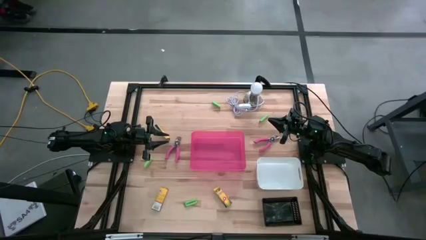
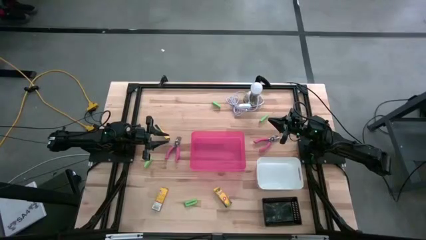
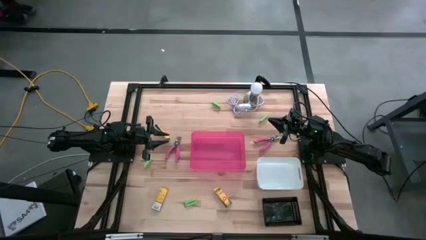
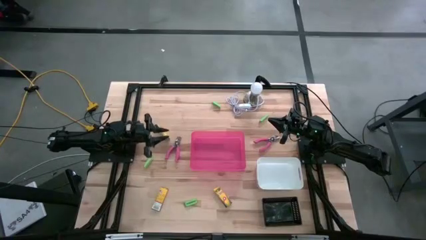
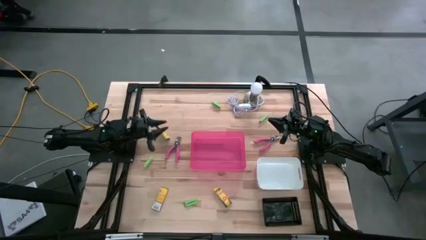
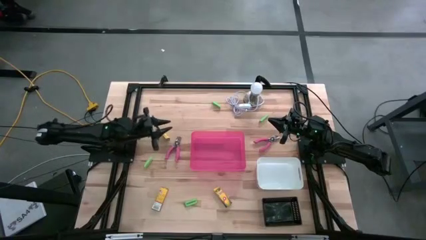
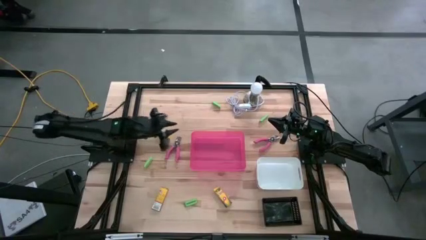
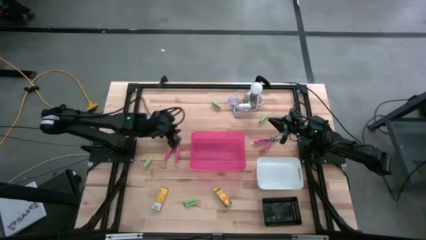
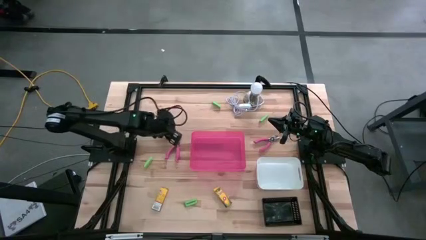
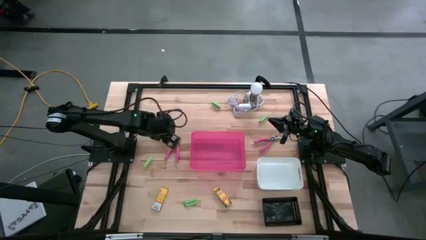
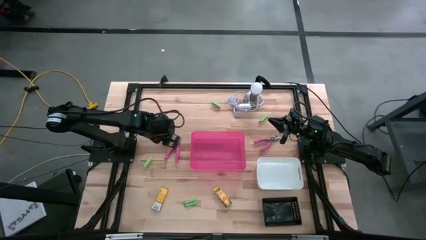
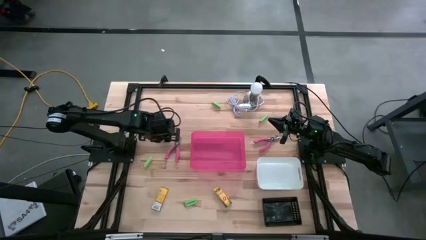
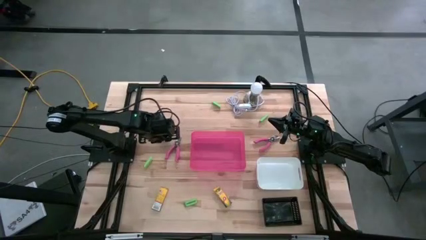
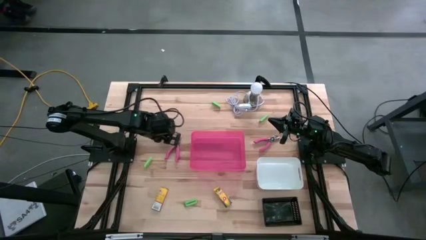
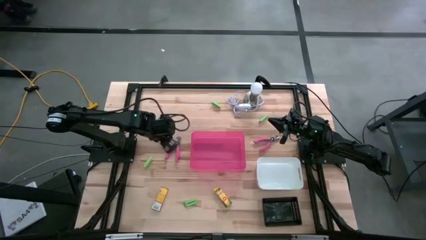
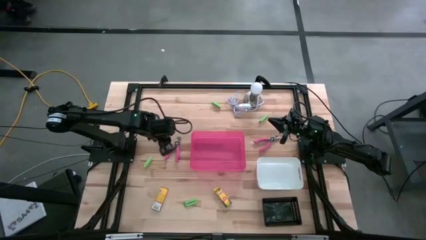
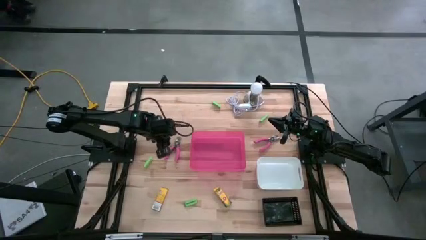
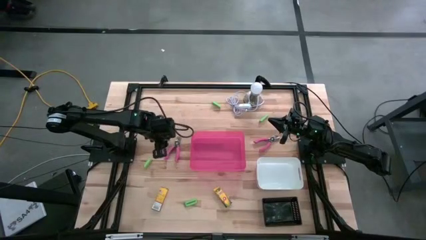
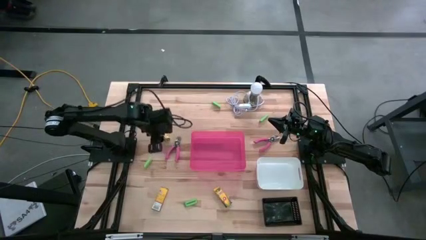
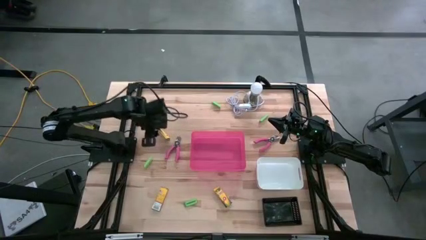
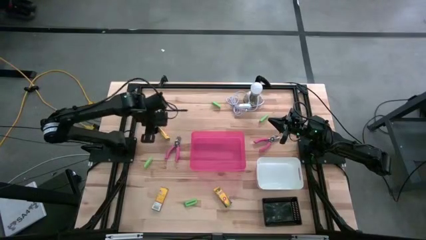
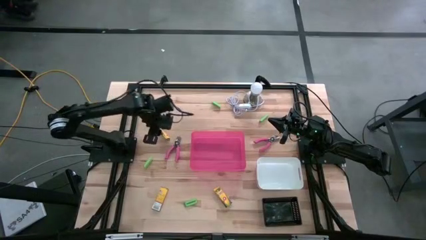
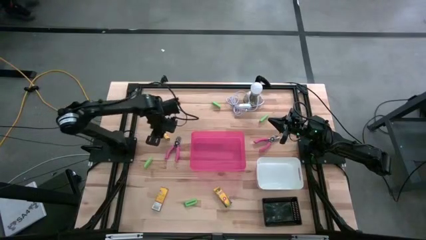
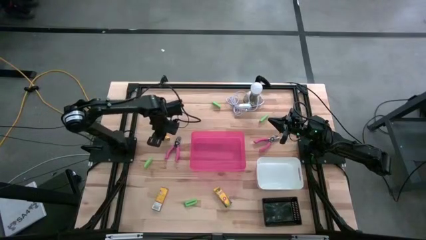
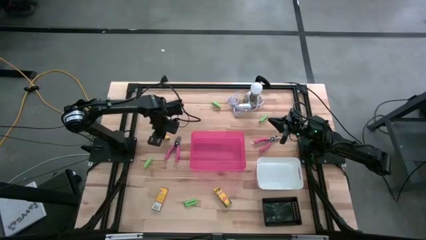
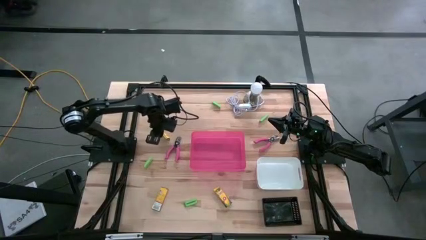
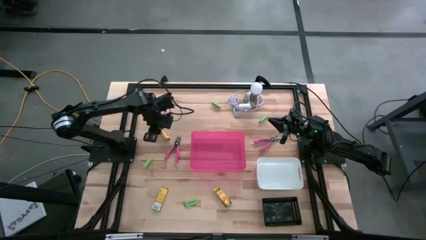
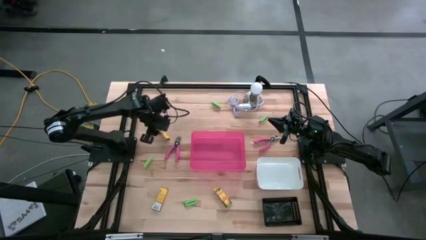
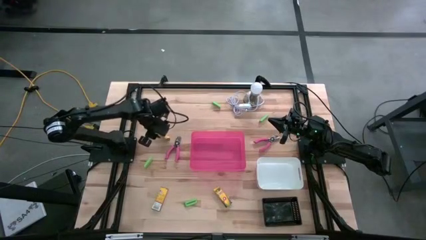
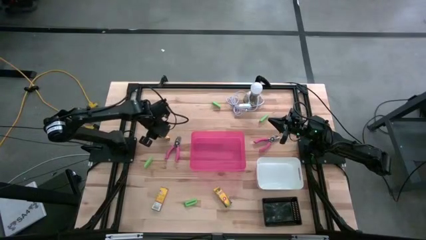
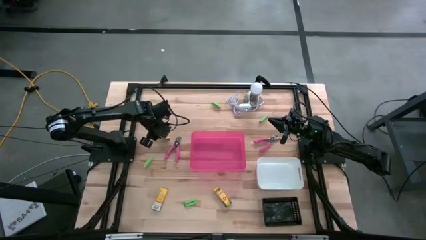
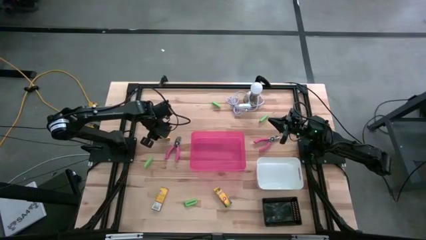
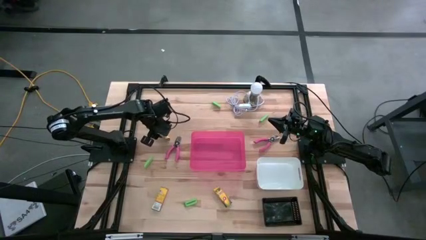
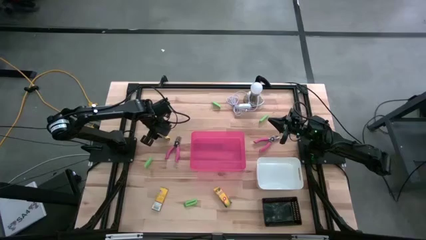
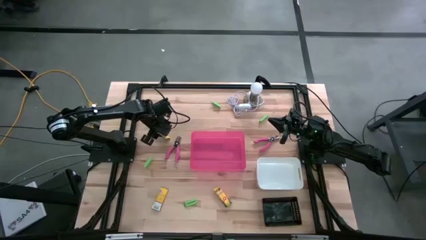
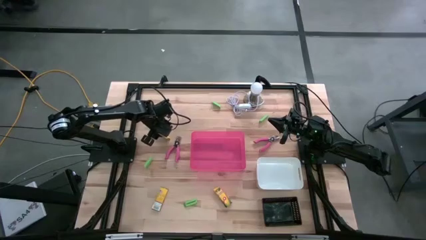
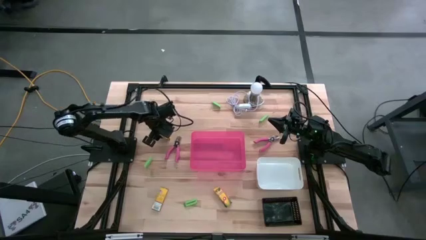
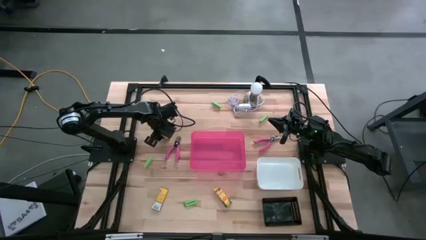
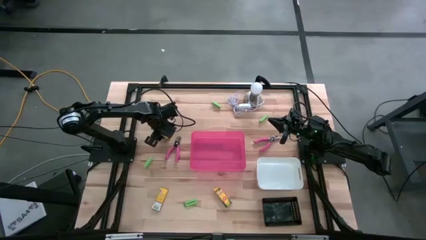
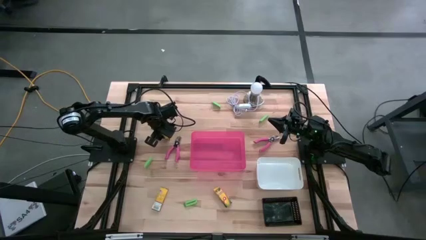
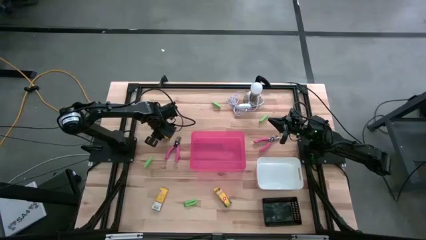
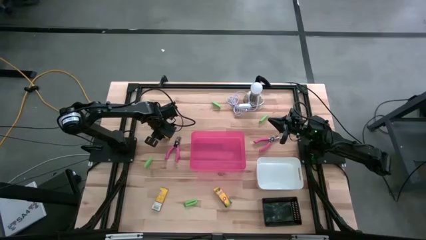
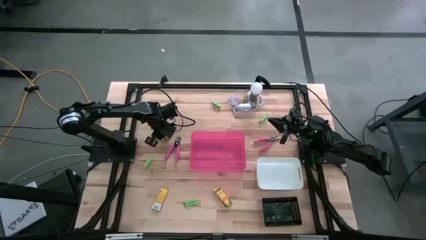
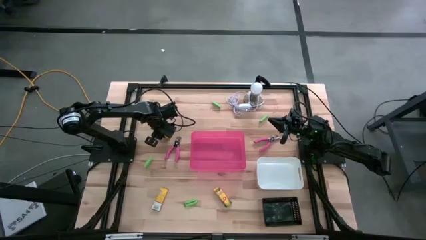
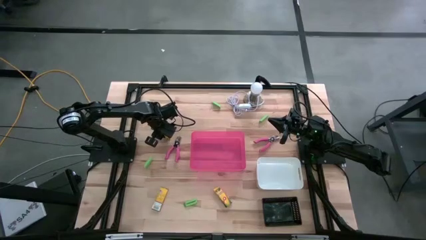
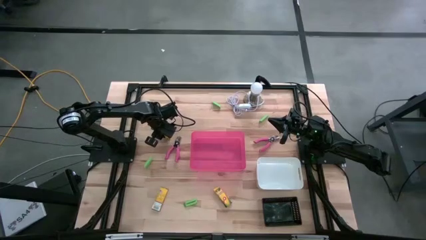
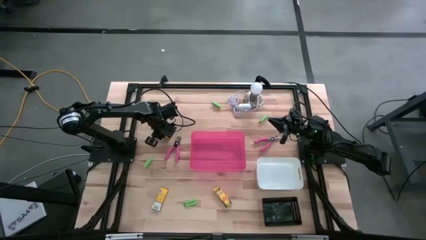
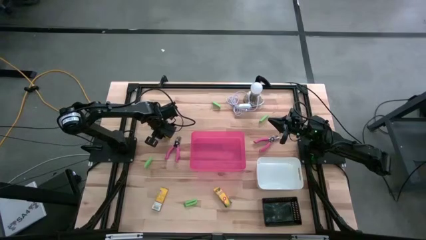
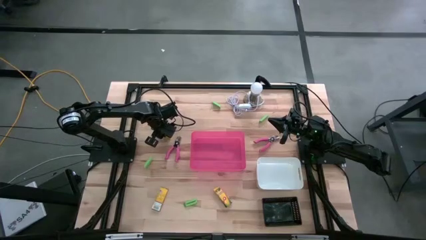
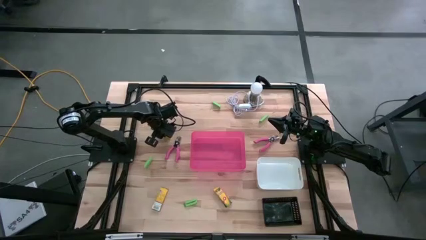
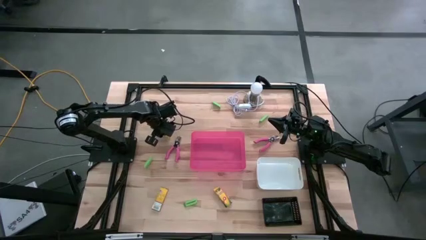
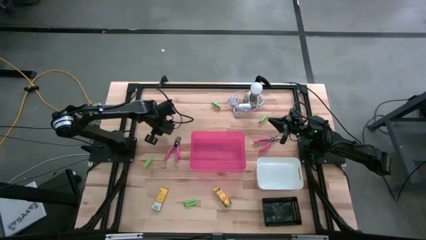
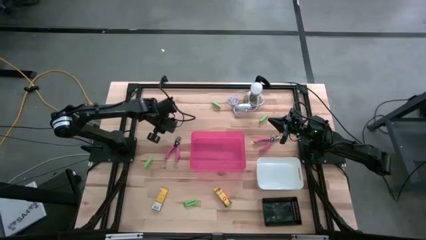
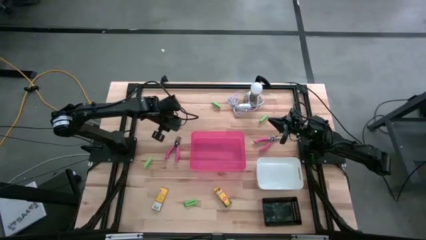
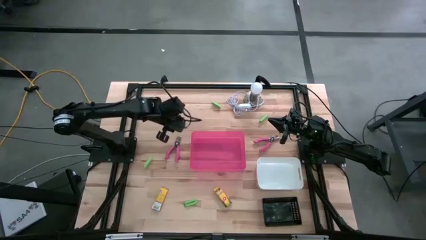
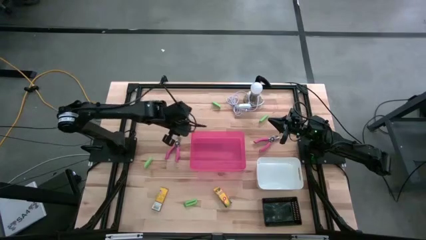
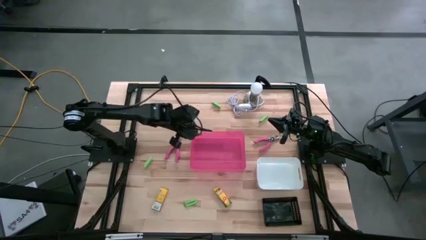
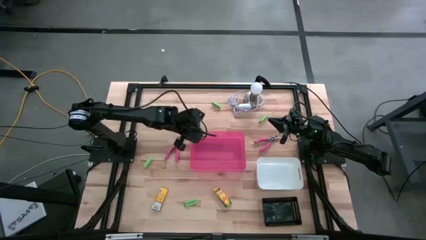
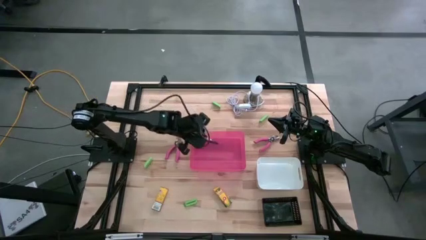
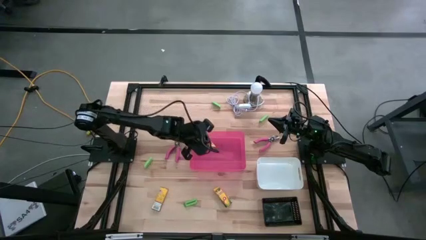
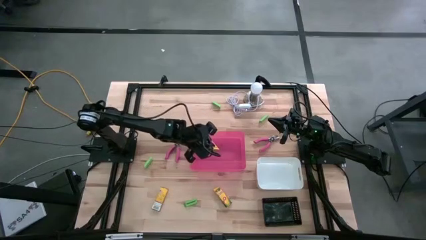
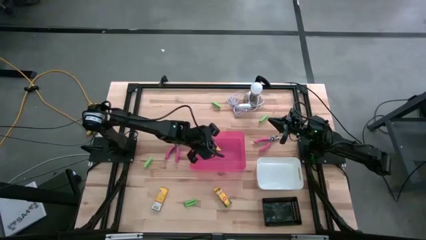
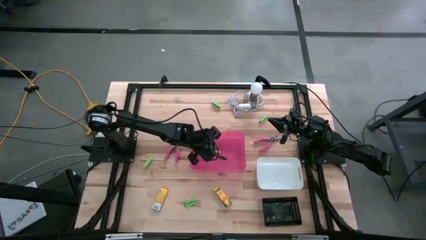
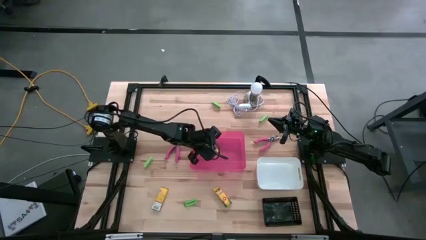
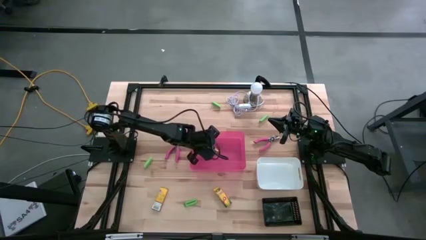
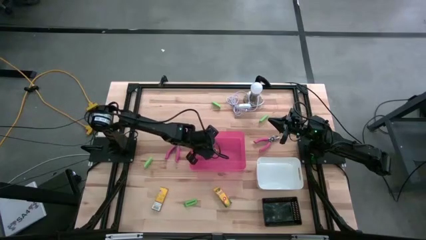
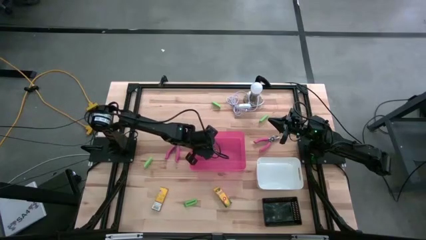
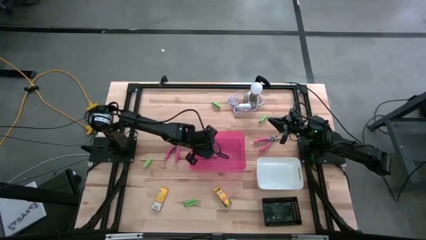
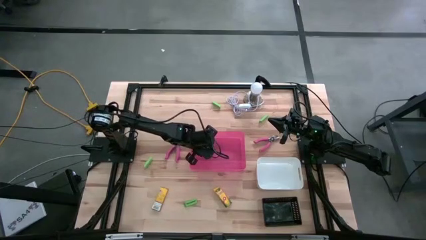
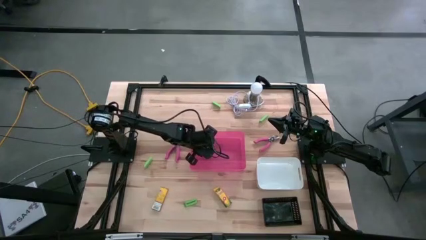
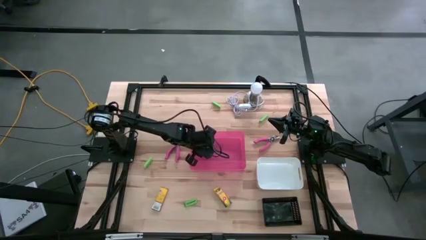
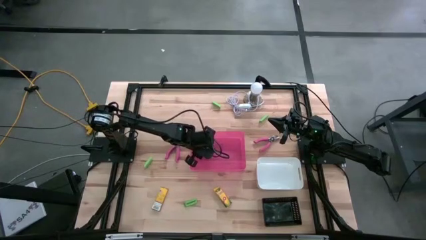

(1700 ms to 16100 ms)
Task: Pick & Place School Supplies
Put the yellow crayon box into the pink bin
